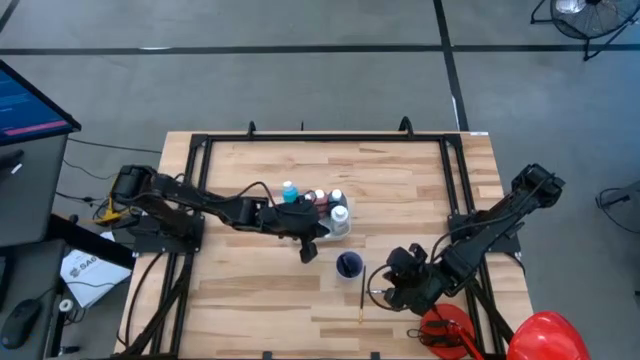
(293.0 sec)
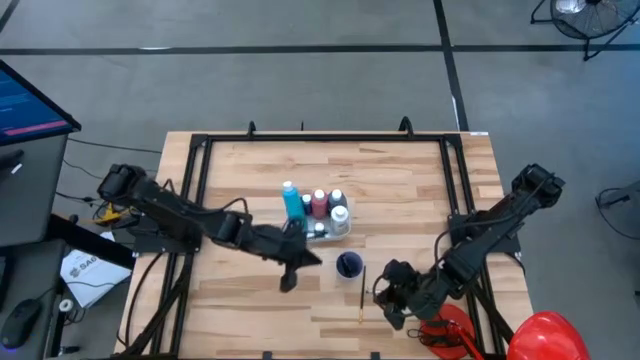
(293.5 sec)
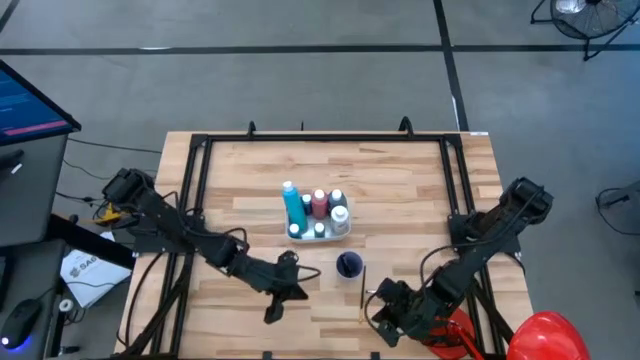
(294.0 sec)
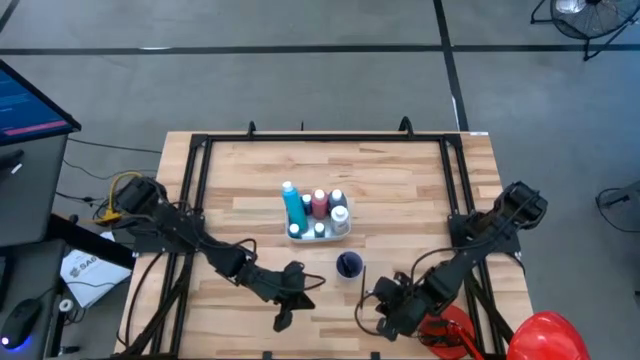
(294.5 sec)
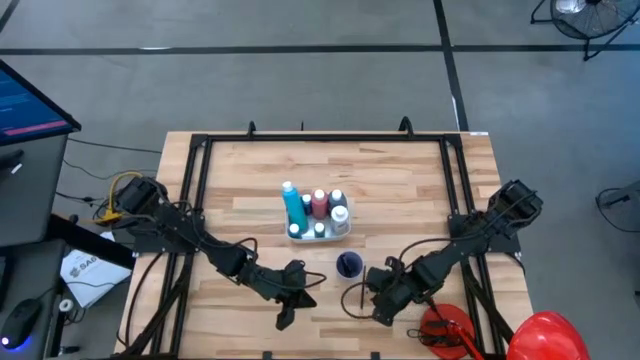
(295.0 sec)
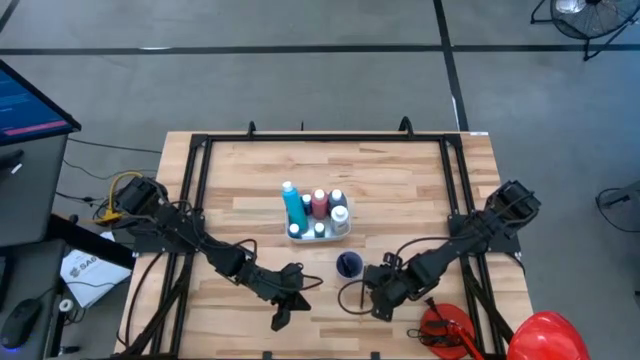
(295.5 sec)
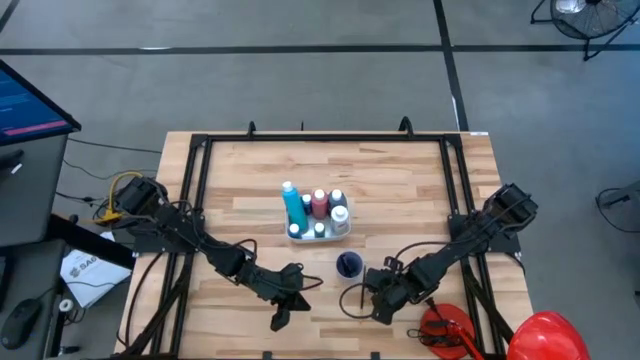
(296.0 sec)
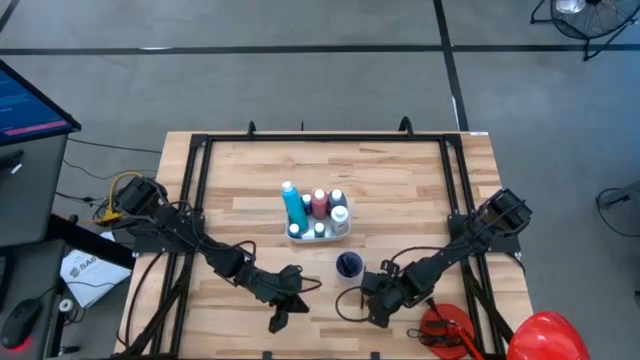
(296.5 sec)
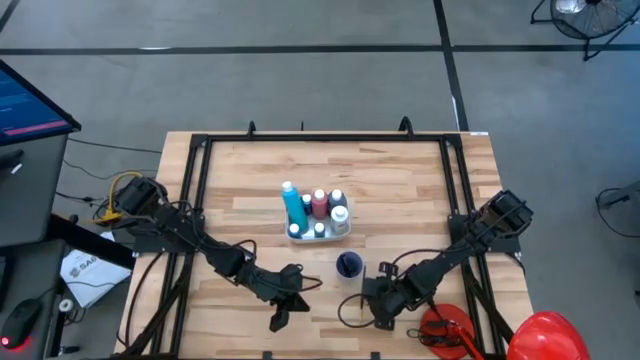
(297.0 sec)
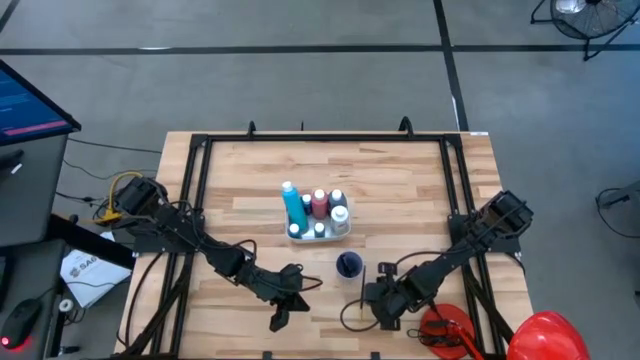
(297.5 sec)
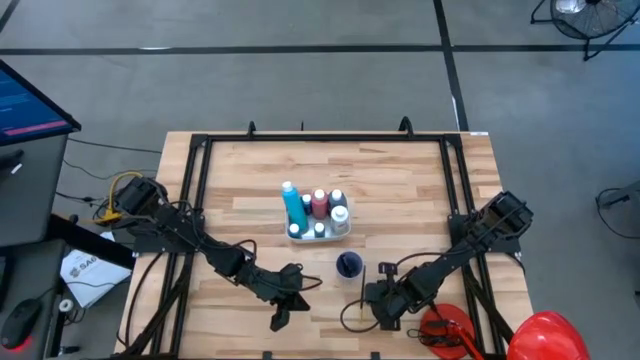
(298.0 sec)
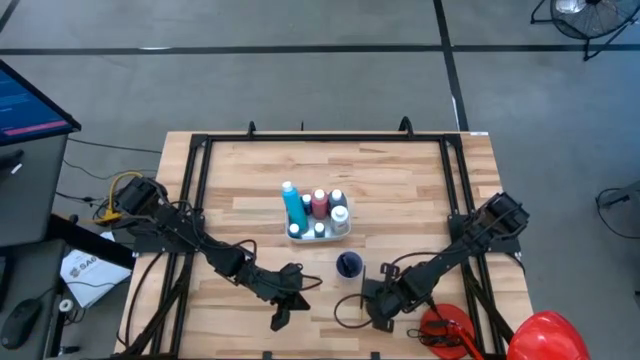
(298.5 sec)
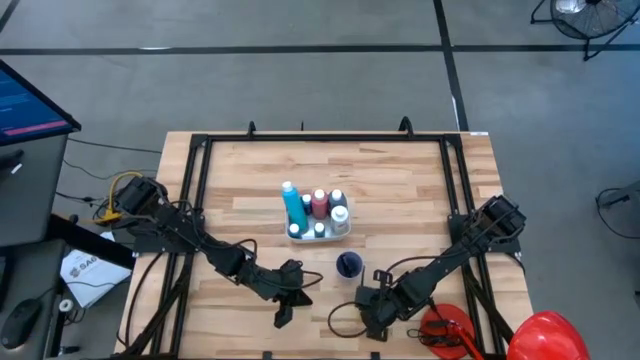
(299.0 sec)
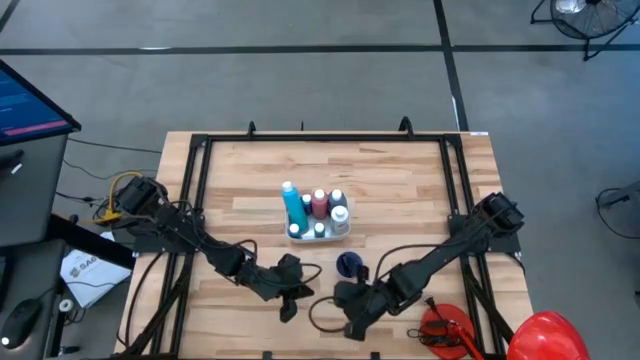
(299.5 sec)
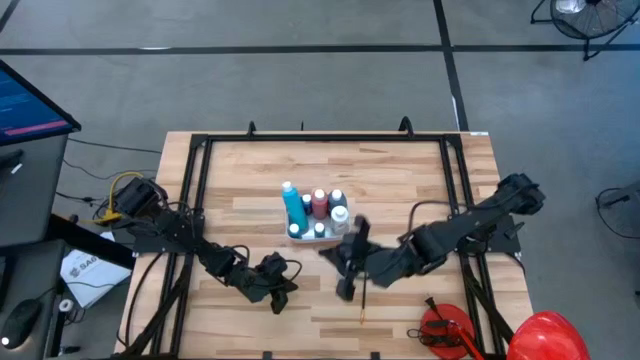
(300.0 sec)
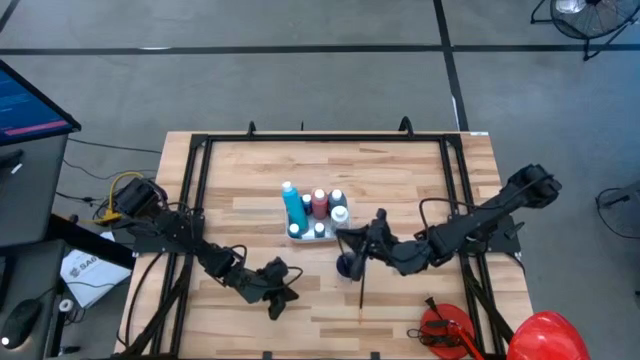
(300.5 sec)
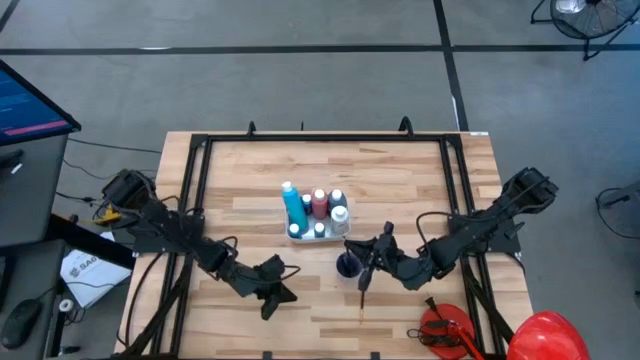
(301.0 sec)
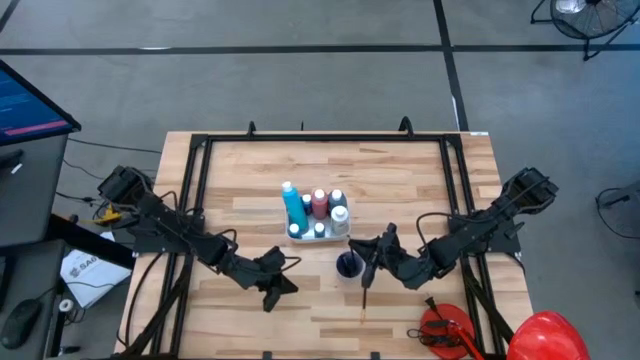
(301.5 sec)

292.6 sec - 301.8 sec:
Task: Pick & Place Paint Supplies
Put the silver paintbrush into the blue cup

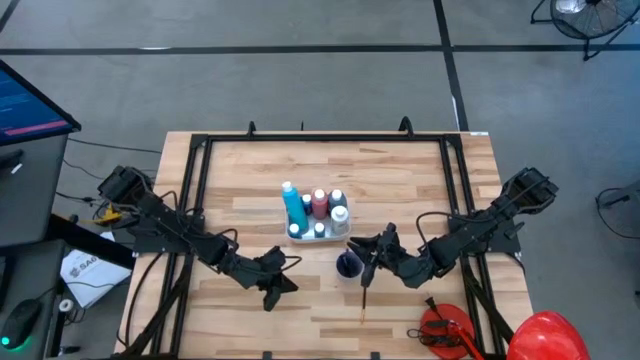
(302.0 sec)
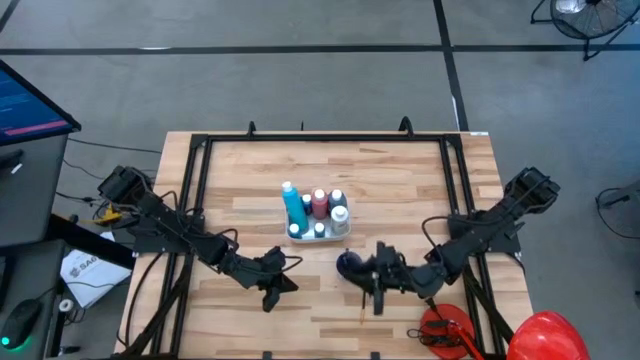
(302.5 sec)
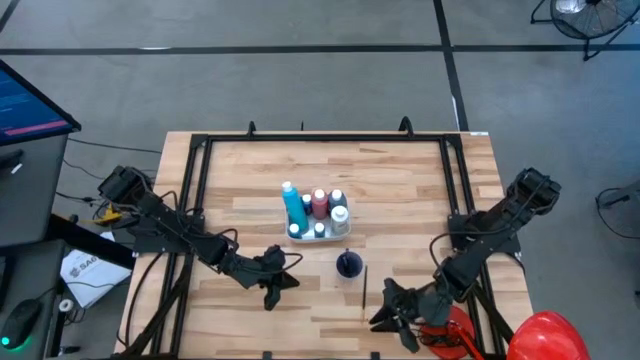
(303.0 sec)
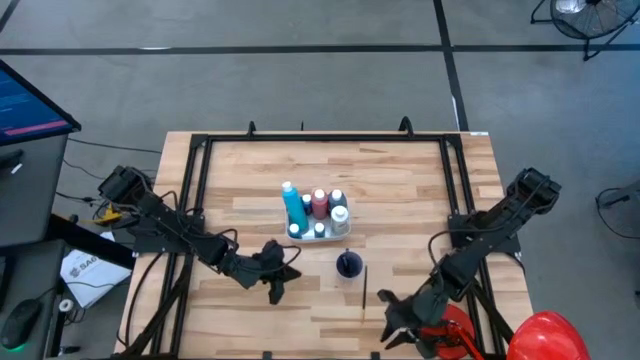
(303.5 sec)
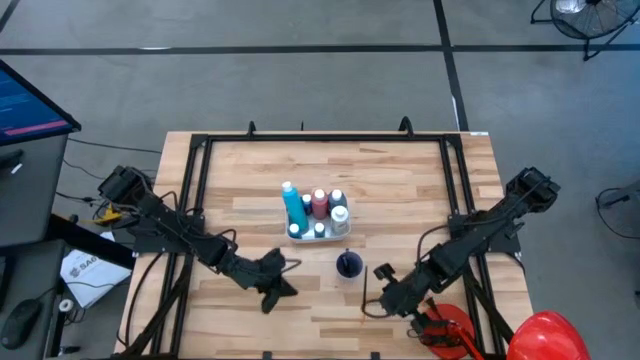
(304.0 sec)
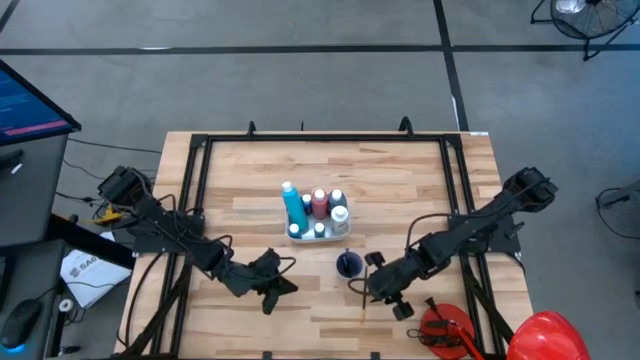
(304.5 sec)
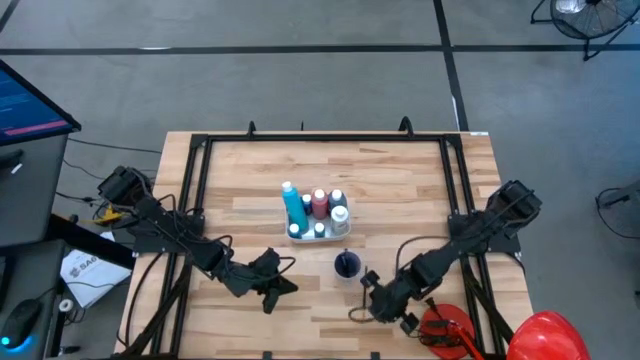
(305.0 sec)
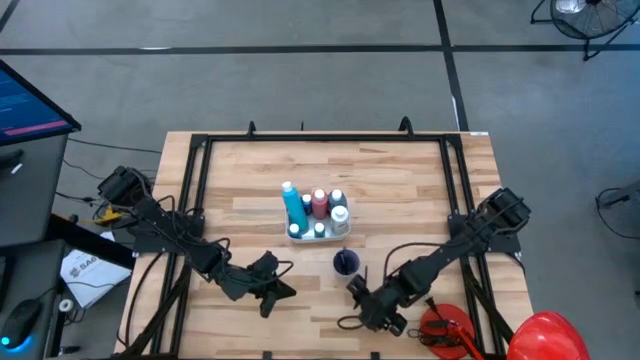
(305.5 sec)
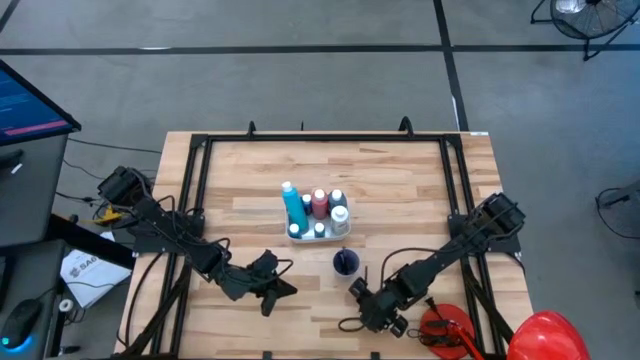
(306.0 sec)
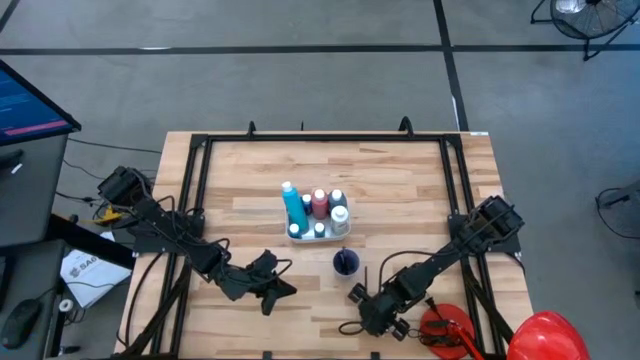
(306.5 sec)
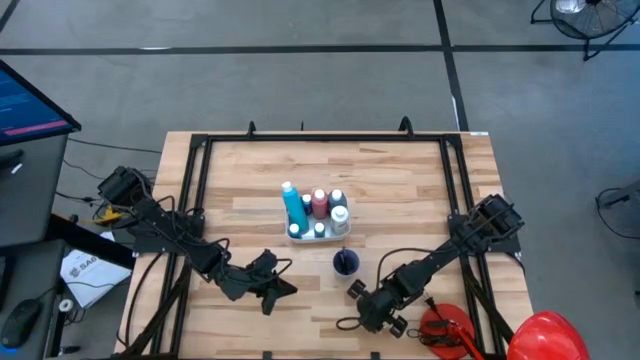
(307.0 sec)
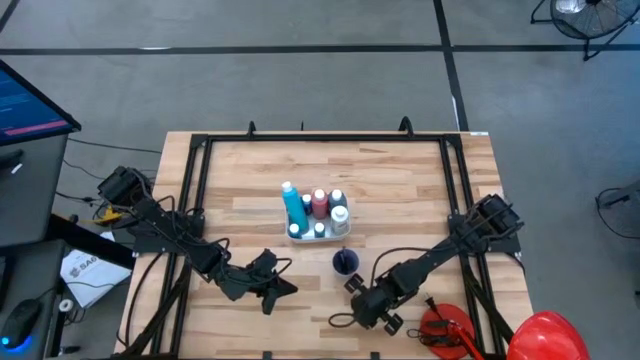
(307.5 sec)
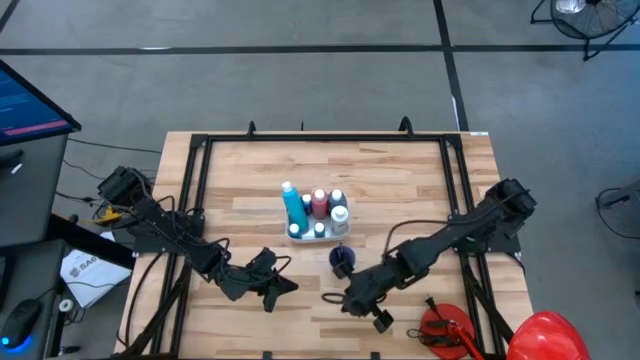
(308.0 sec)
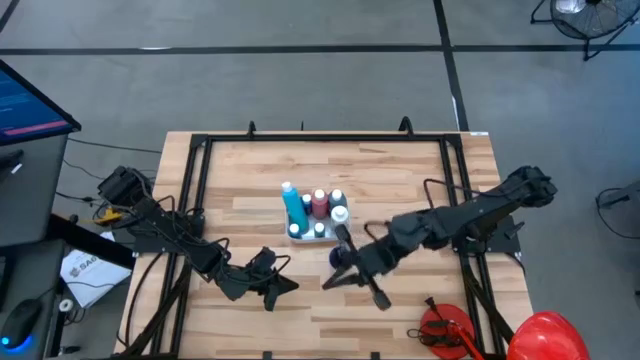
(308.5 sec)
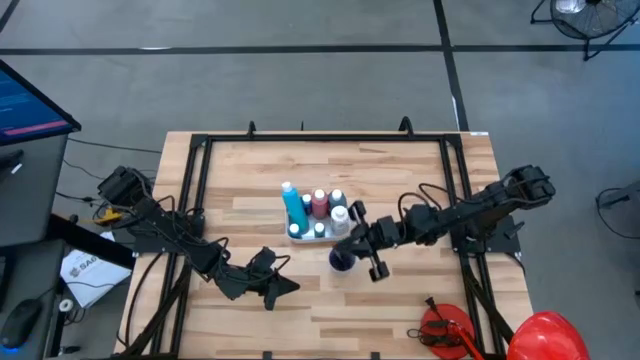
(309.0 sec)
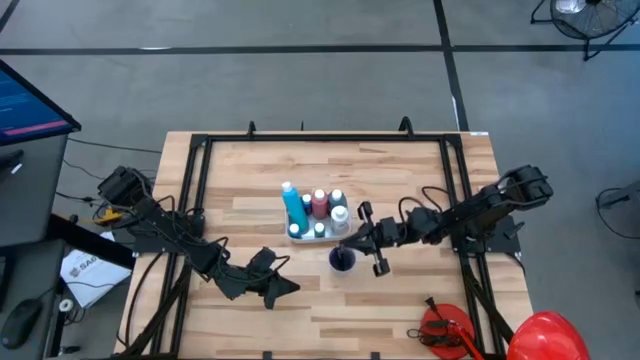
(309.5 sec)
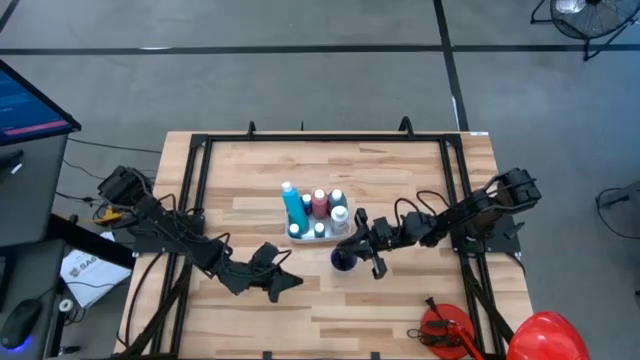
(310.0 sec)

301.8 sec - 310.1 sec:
Put the gold paintbrush into the blue cup

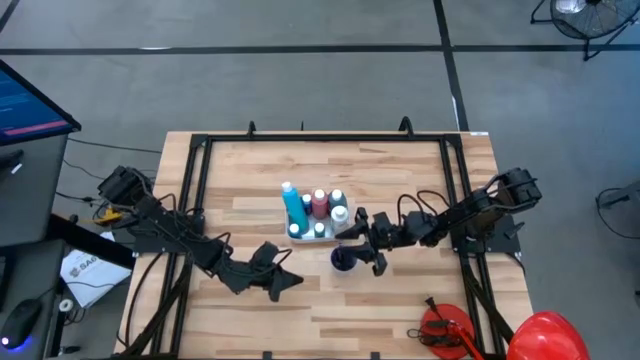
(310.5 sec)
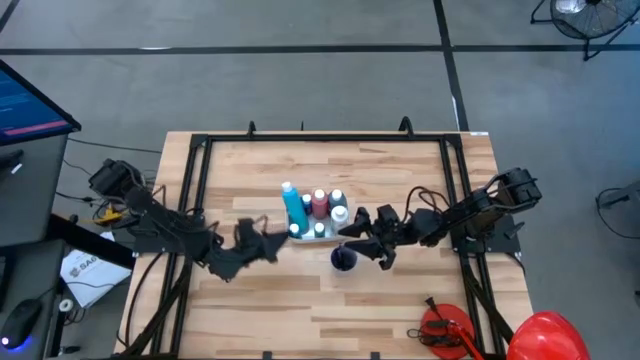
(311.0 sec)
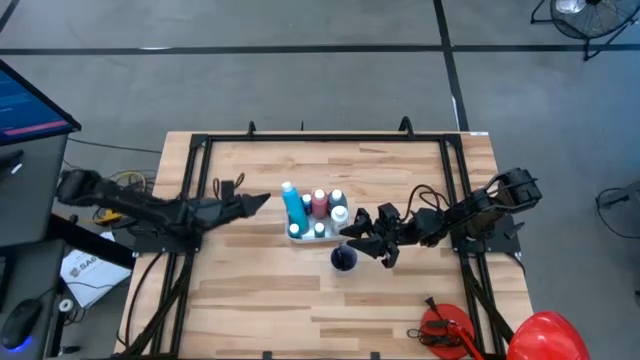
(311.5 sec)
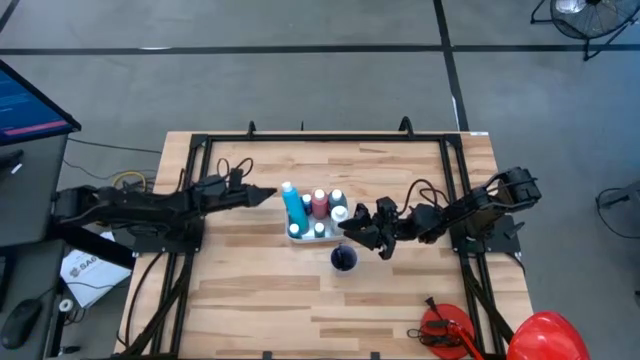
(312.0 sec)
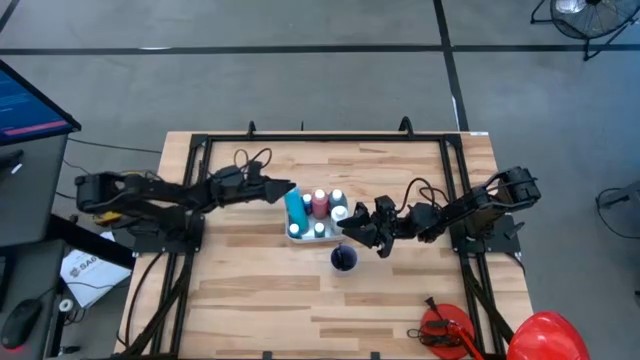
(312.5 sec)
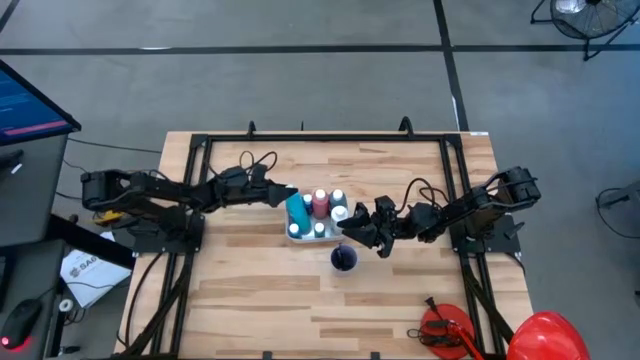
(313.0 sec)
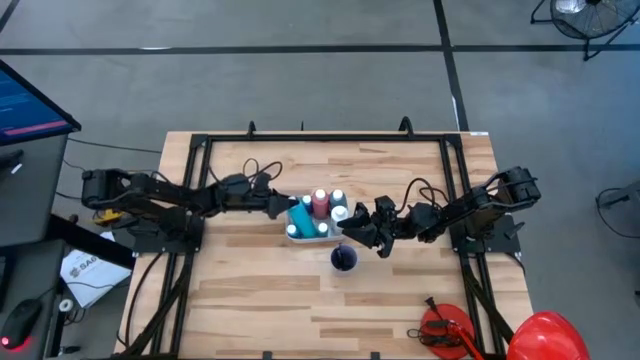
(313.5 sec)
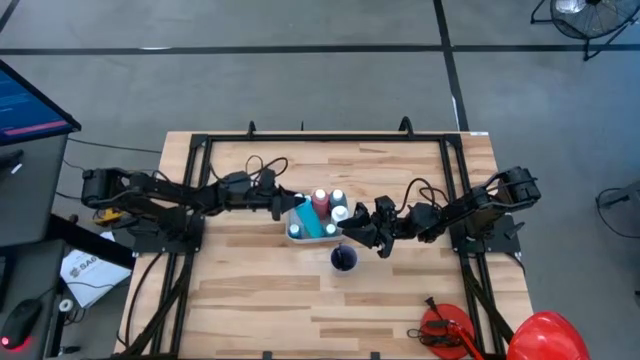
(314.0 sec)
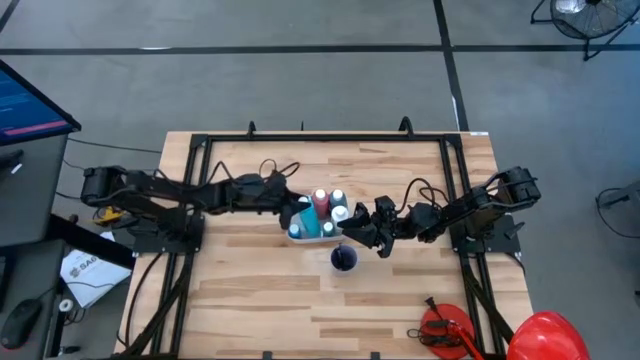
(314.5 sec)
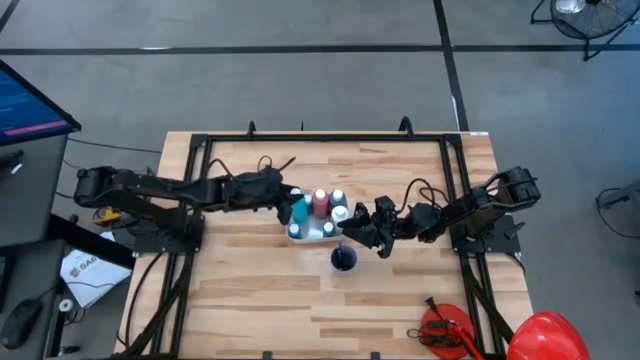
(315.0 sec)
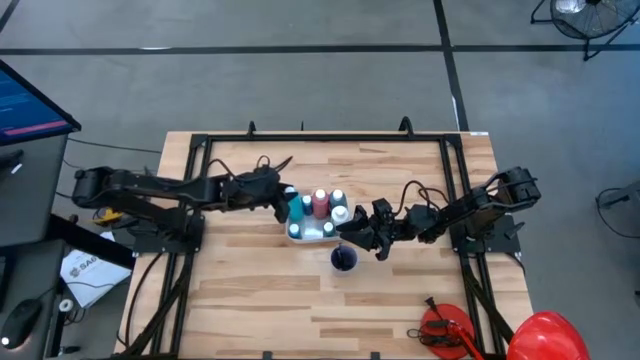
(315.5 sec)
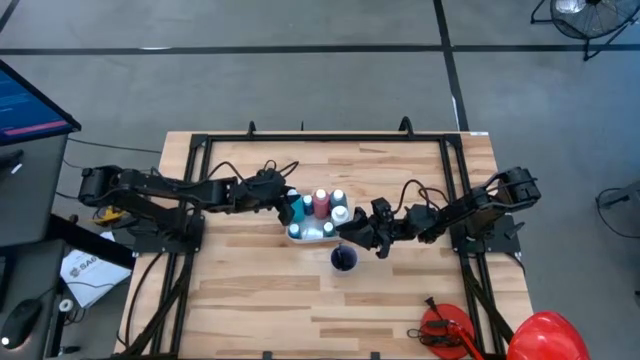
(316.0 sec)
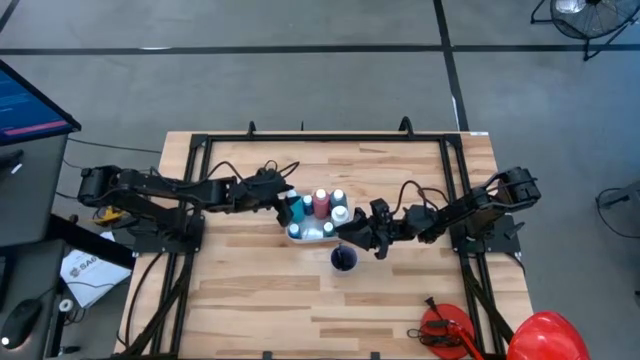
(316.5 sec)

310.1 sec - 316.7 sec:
Adjust the light blue paint bottle in the white bin
